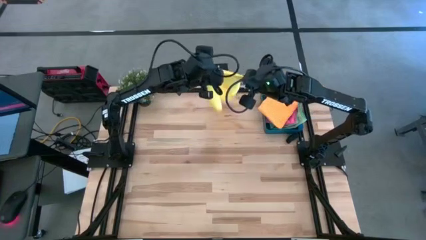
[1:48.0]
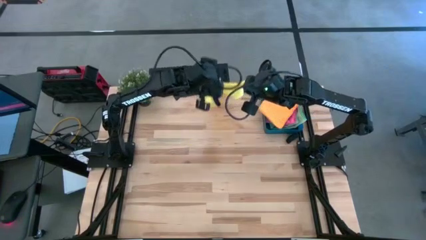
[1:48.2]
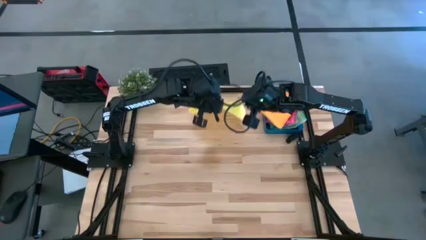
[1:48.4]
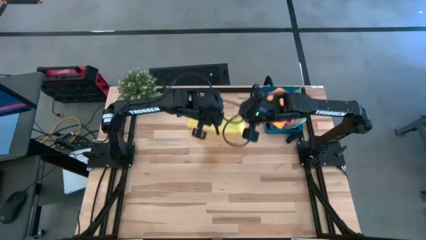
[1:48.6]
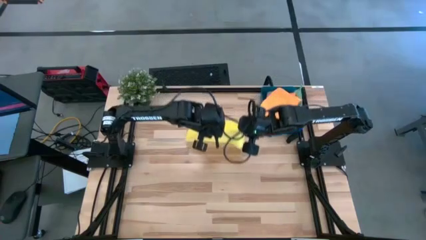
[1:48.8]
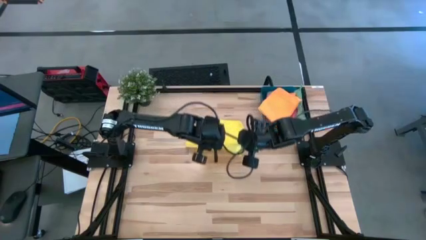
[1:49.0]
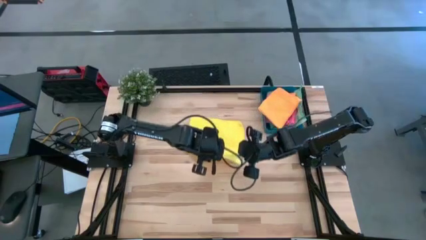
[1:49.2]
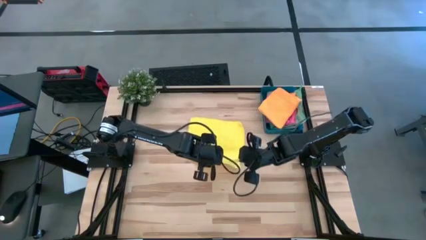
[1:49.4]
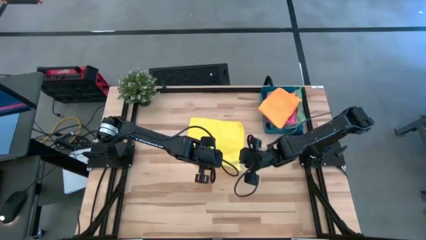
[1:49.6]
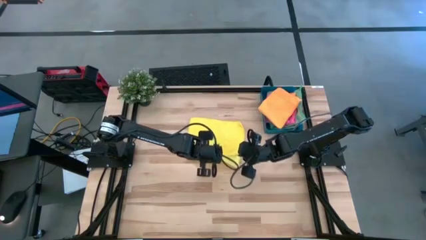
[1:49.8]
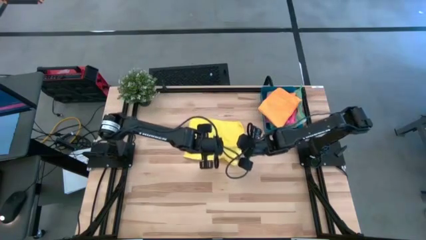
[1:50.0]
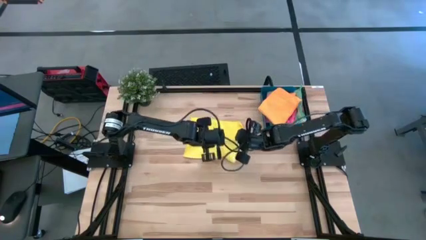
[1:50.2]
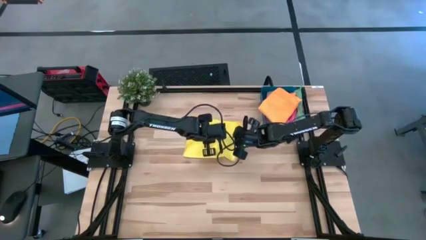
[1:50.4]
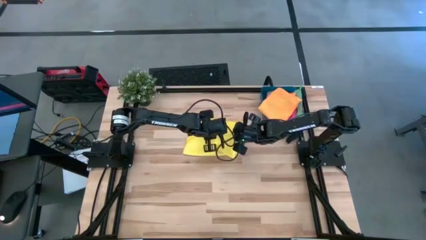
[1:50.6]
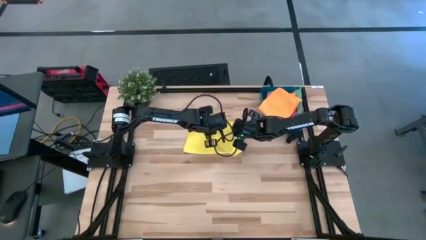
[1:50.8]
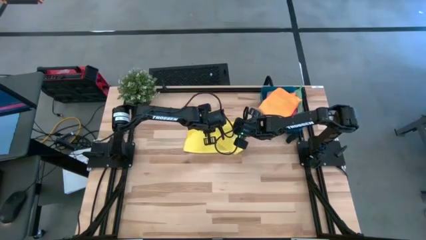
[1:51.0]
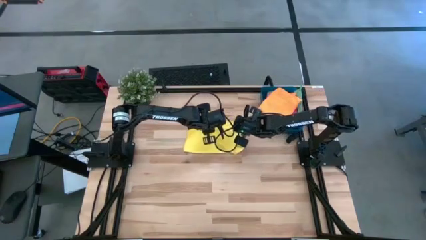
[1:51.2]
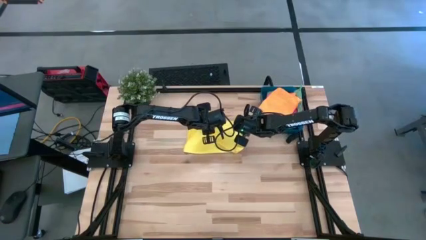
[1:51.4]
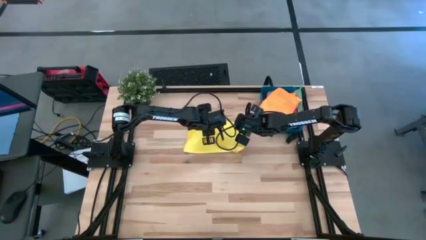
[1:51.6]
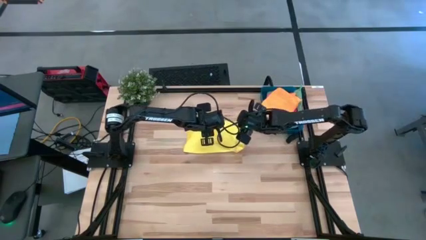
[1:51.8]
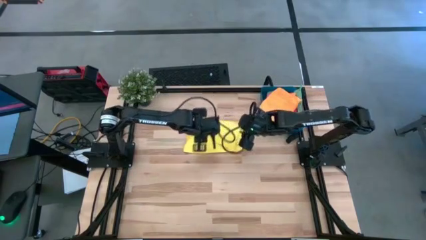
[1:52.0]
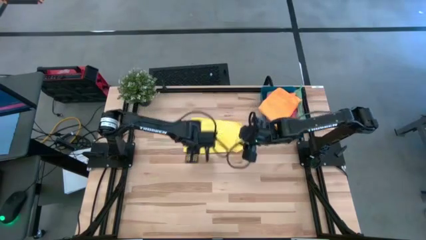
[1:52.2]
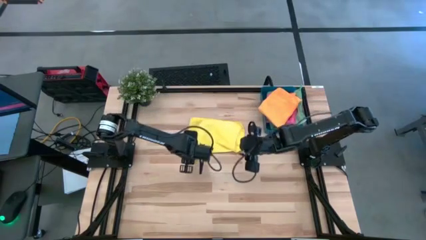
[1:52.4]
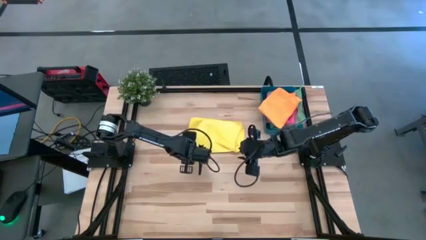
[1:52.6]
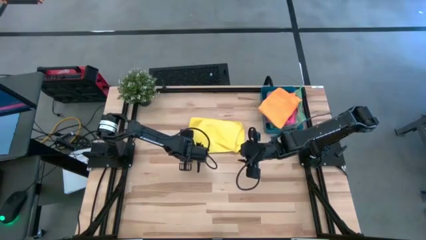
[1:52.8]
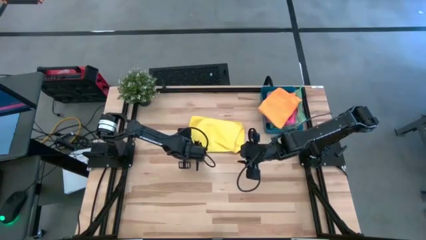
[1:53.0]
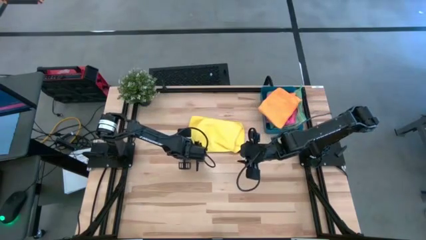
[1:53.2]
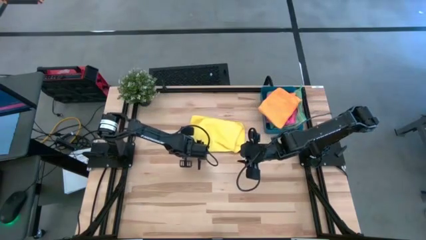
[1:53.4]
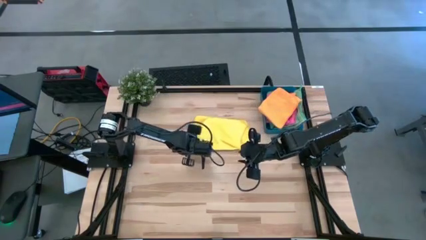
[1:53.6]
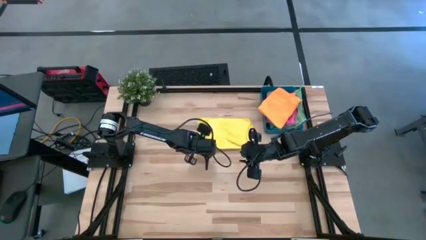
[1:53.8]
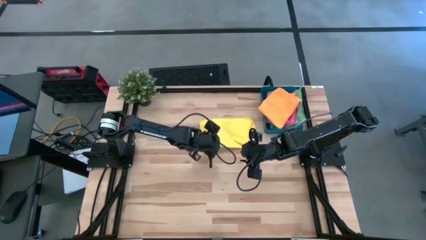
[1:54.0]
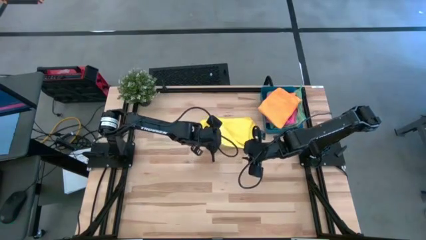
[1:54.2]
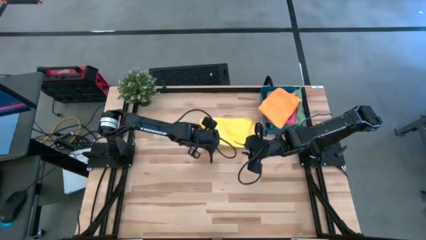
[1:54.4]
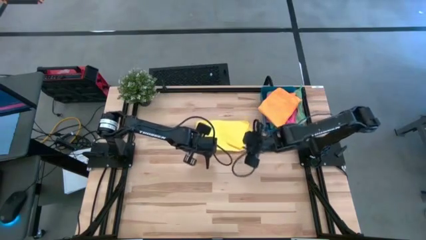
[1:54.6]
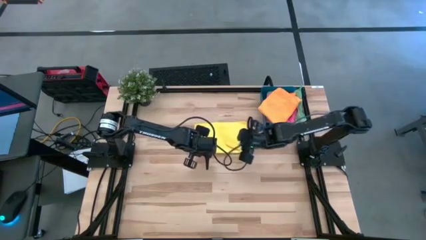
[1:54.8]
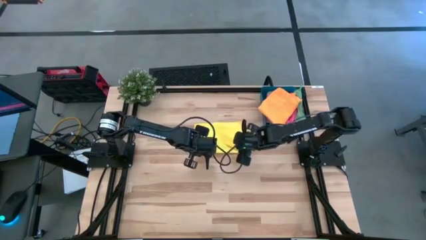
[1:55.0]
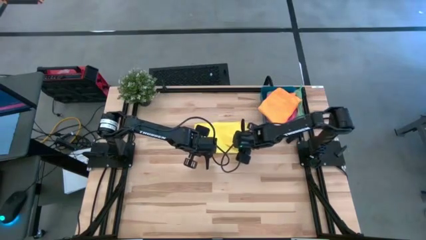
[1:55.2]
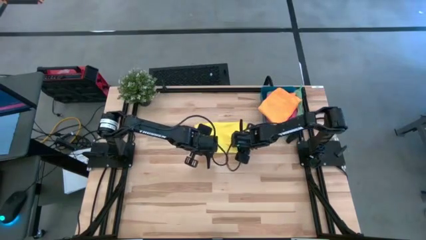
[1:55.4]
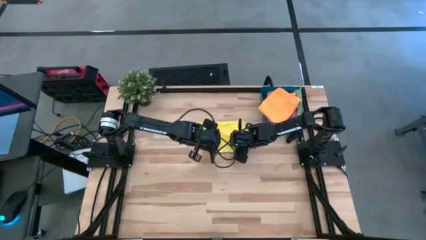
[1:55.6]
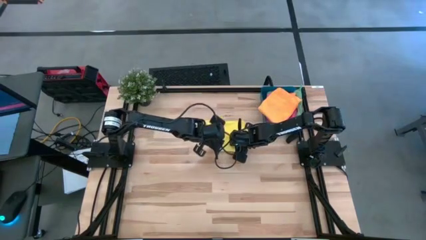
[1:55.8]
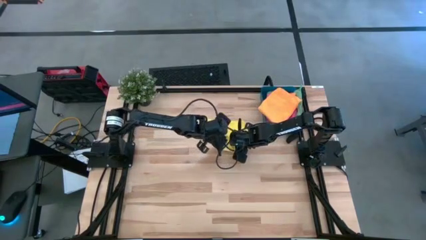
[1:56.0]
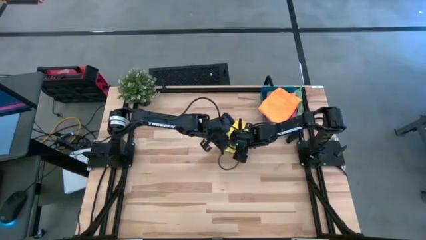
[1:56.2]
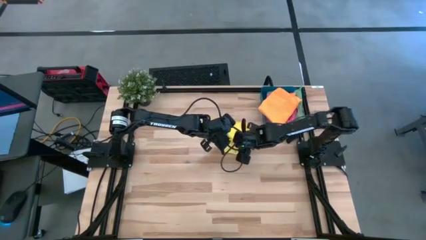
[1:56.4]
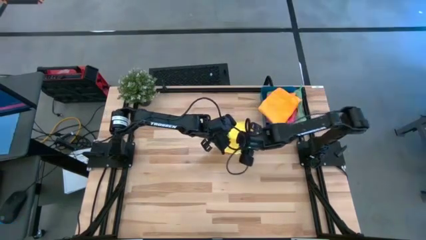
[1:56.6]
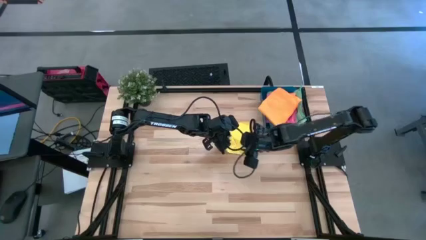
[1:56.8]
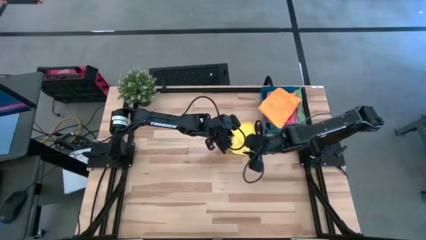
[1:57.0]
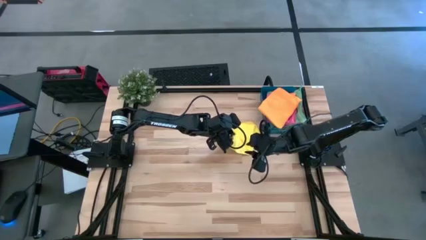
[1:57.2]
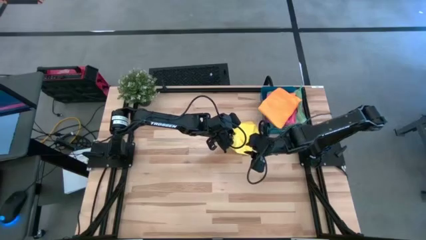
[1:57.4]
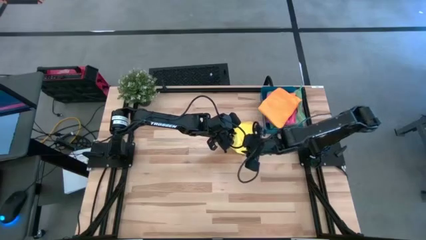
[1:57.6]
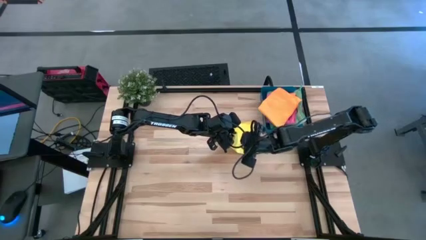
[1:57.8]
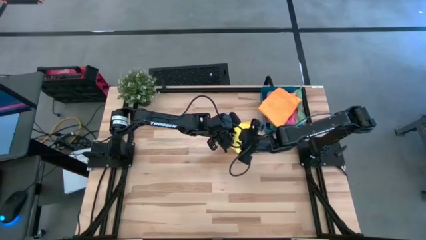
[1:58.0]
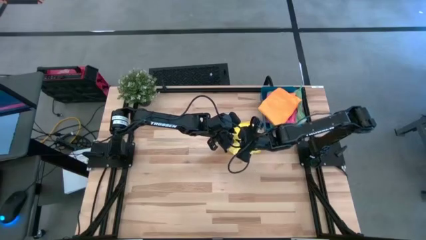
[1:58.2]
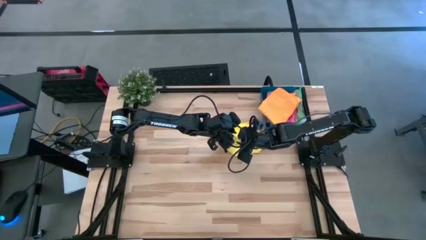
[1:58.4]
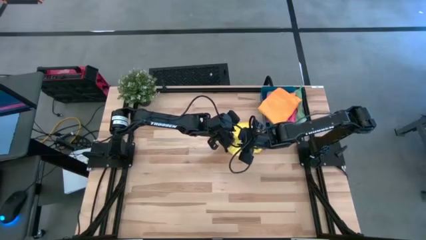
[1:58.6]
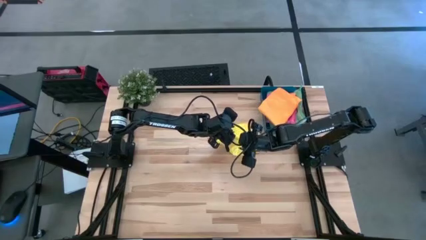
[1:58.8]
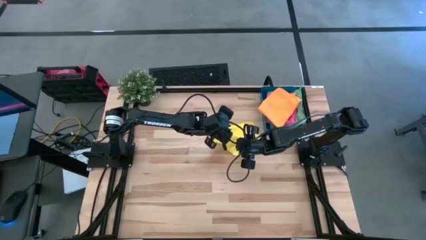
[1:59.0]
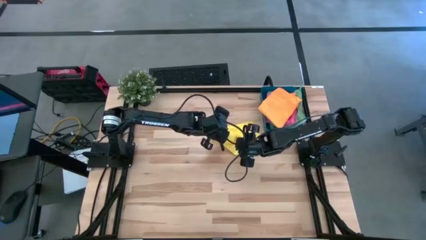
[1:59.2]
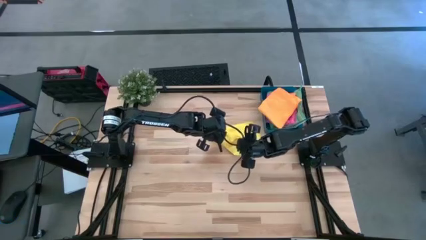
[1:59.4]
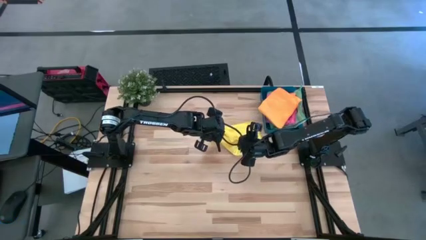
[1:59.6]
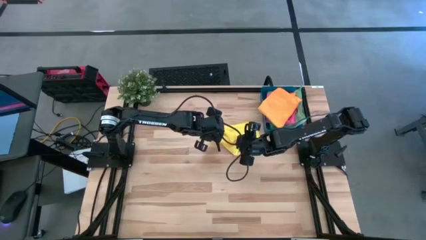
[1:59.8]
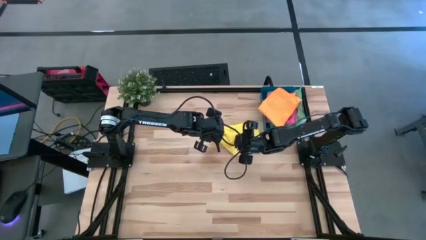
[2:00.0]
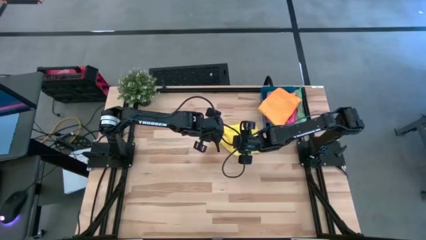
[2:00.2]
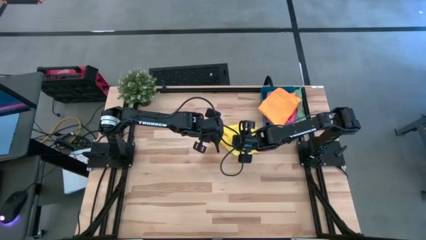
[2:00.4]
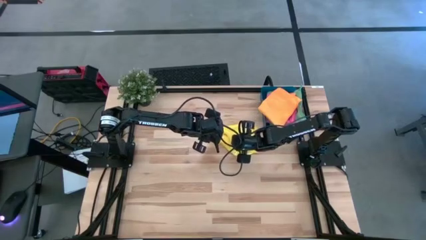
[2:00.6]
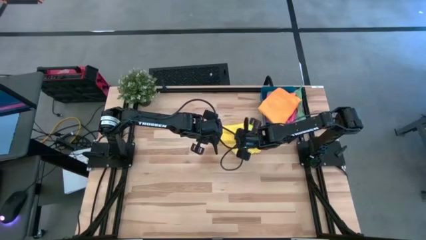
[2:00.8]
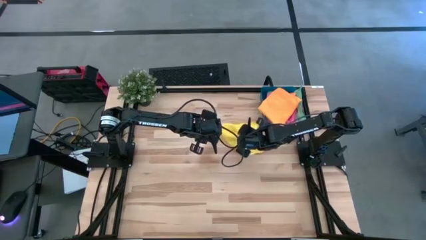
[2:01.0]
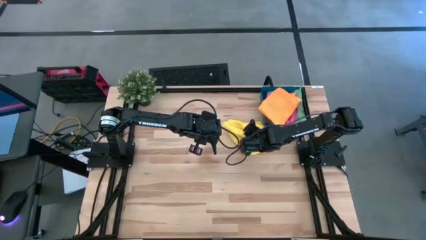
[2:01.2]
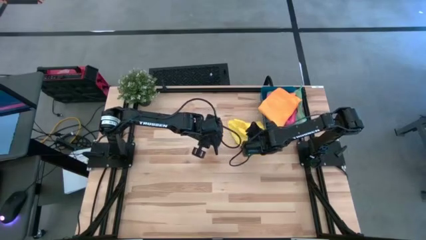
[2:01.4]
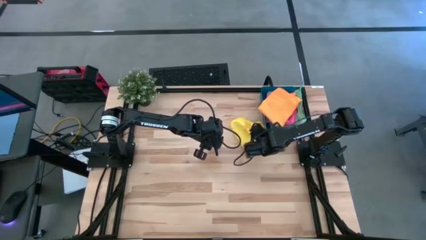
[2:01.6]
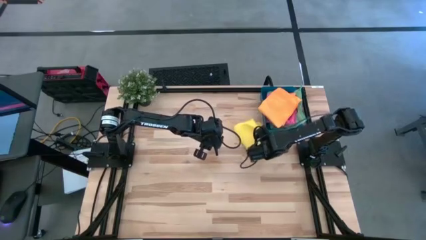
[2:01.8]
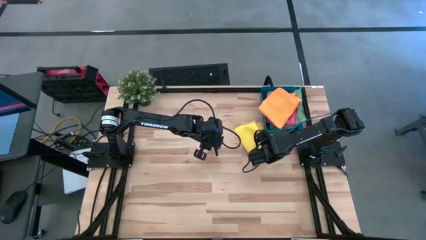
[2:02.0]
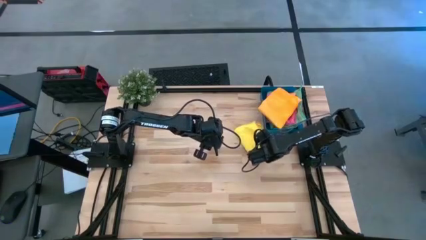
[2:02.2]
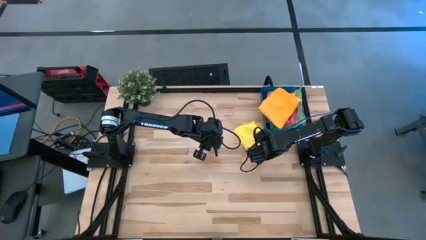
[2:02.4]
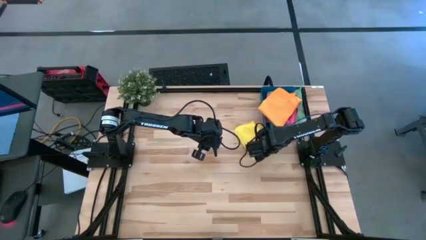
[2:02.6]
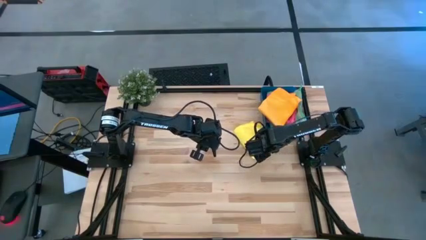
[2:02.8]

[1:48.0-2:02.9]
Task: Fold microfiber towels
Fold the yellow microfiber towel on the table

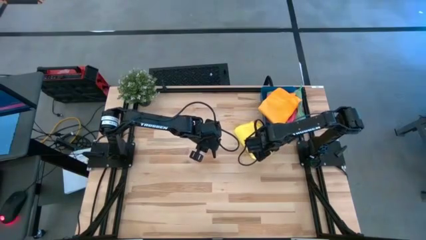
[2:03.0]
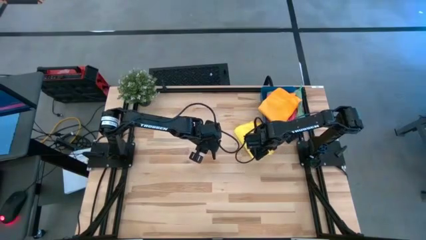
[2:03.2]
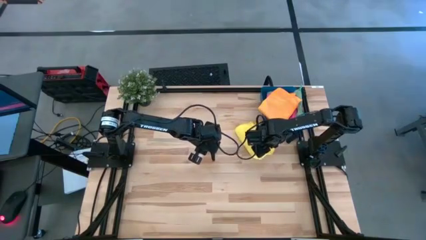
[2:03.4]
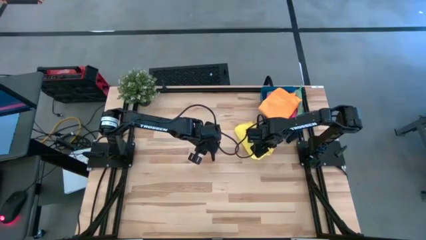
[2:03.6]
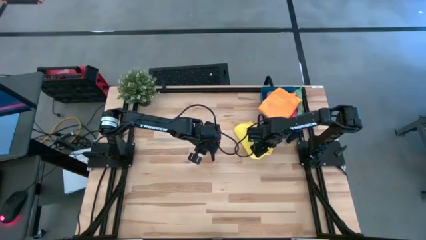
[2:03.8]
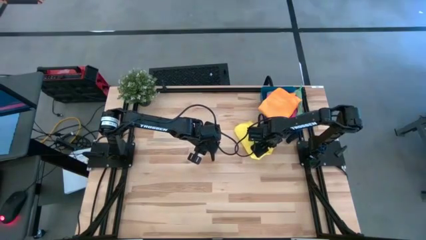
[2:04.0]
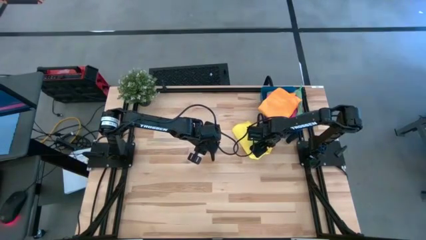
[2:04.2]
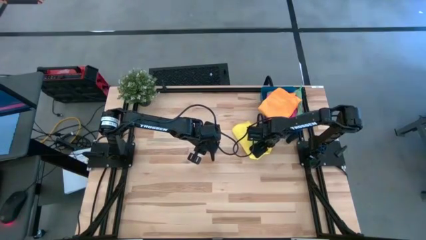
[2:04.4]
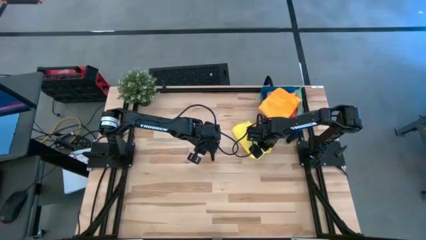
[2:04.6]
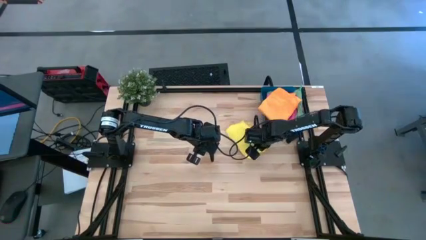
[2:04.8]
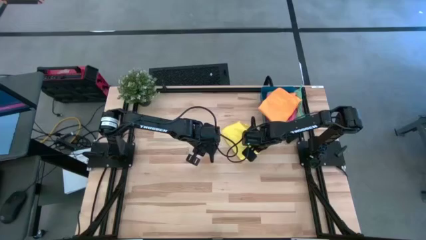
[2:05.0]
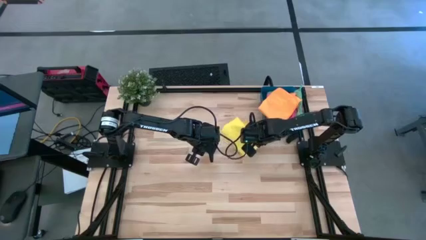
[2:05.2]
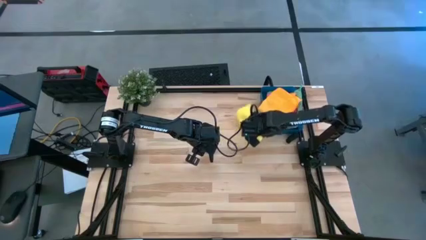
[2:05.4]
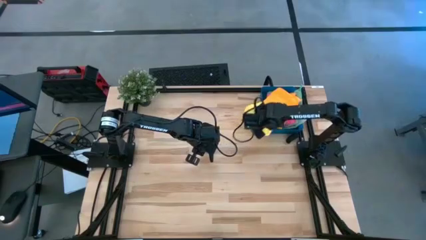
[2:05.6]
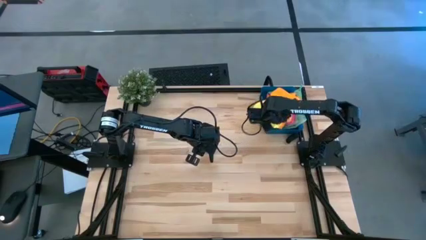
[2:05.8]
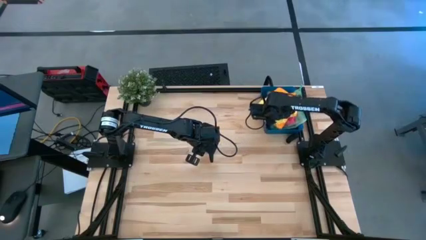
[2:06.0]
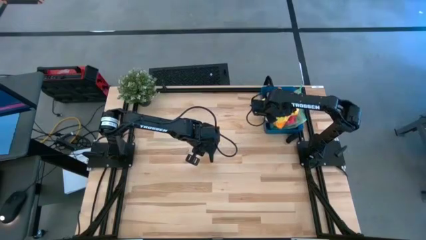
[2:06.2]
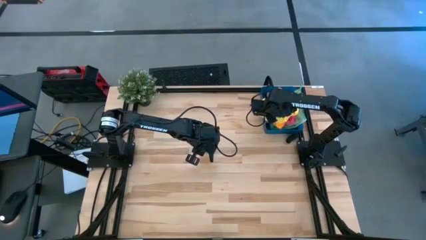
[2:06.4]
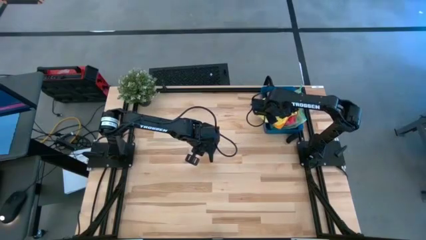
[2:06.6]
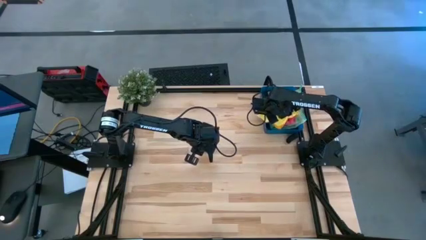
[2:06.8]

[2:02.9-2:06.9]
Put the yellow folded microfiber towel into the bin
